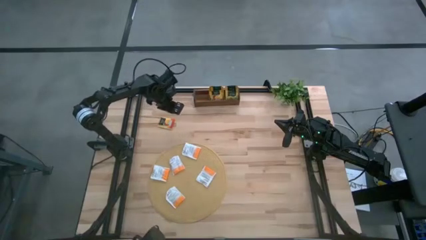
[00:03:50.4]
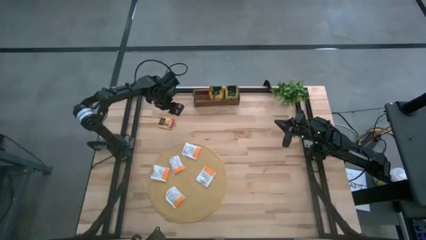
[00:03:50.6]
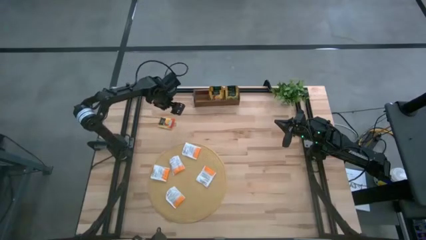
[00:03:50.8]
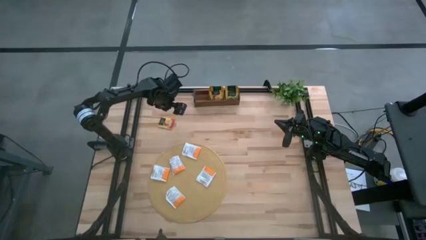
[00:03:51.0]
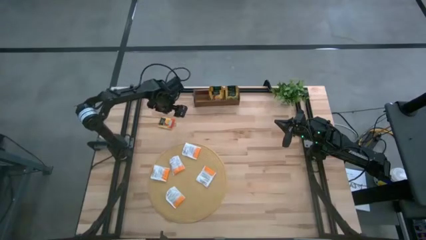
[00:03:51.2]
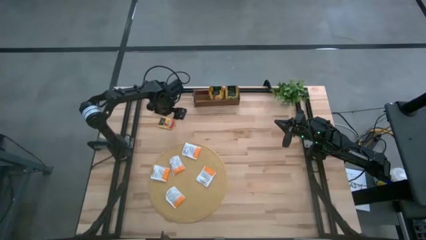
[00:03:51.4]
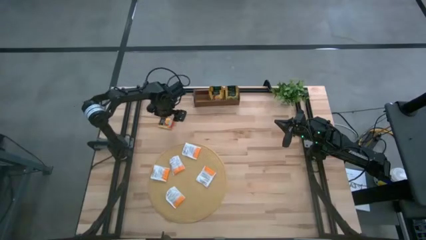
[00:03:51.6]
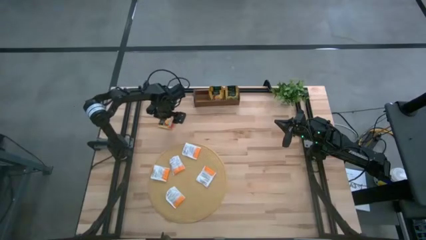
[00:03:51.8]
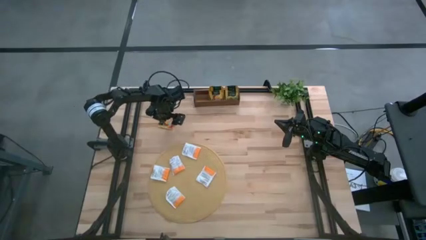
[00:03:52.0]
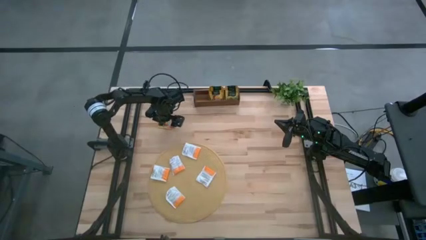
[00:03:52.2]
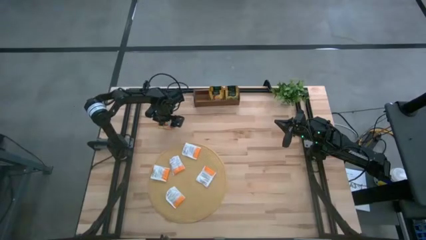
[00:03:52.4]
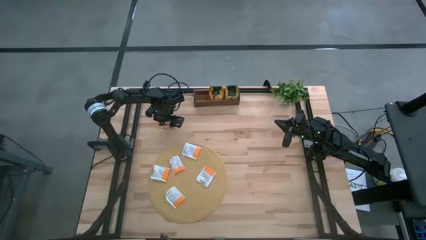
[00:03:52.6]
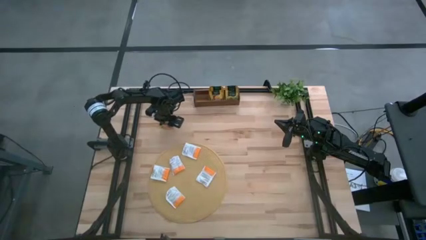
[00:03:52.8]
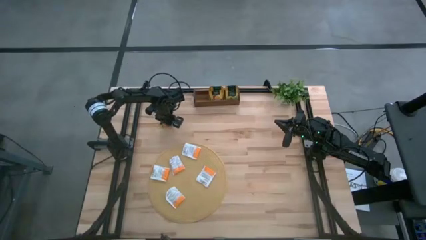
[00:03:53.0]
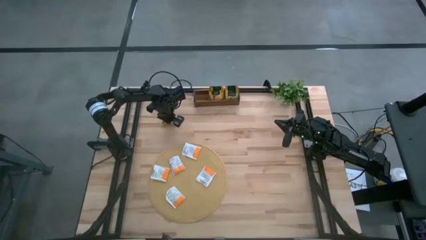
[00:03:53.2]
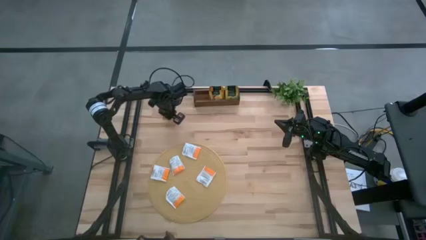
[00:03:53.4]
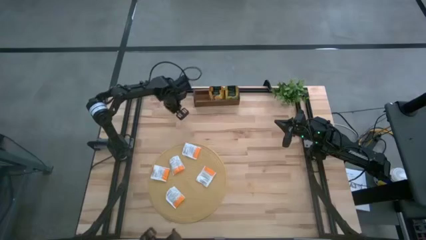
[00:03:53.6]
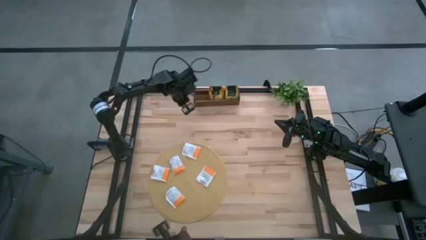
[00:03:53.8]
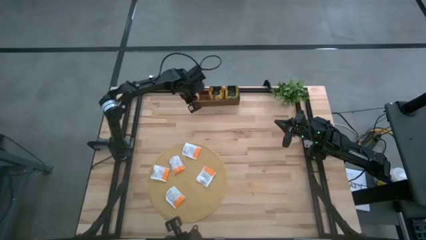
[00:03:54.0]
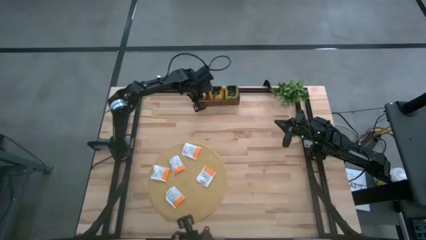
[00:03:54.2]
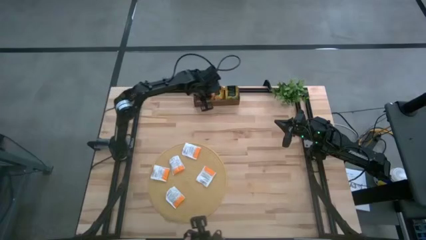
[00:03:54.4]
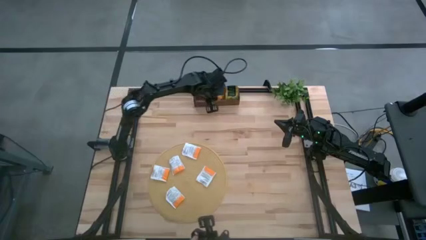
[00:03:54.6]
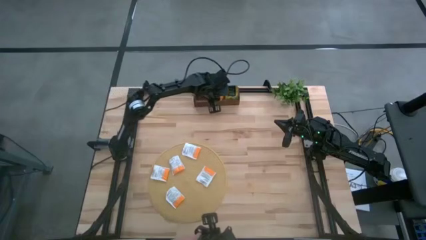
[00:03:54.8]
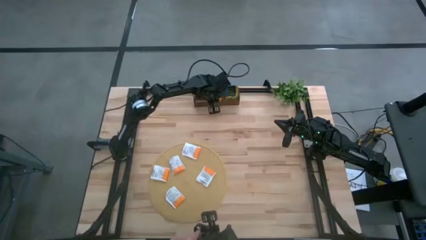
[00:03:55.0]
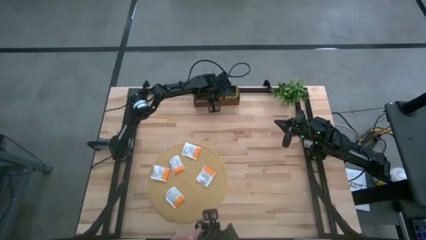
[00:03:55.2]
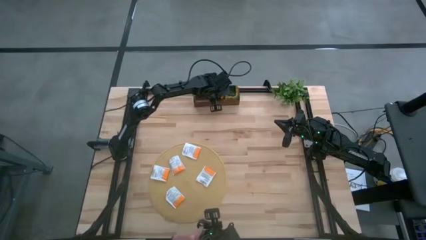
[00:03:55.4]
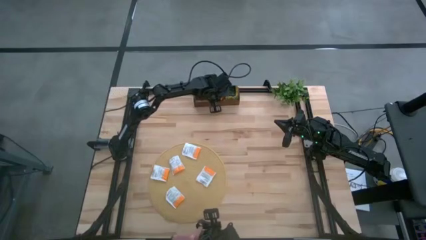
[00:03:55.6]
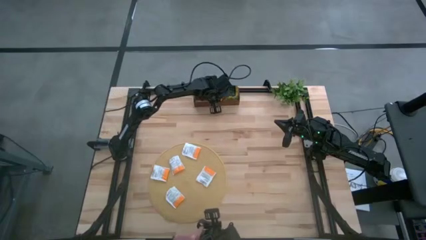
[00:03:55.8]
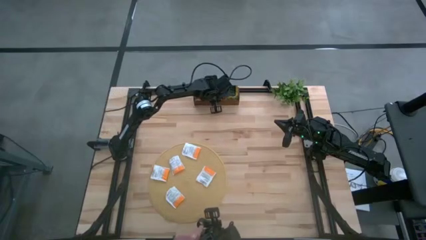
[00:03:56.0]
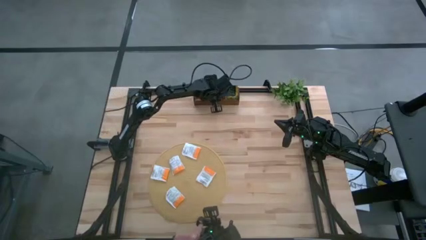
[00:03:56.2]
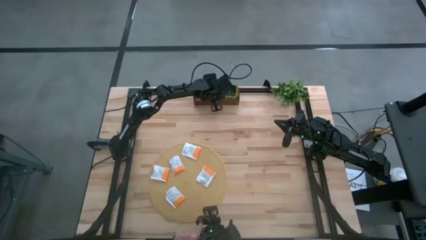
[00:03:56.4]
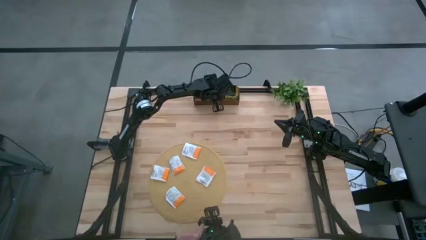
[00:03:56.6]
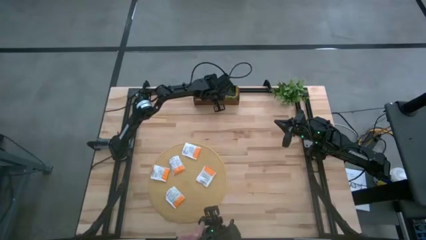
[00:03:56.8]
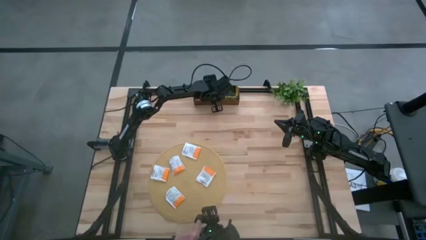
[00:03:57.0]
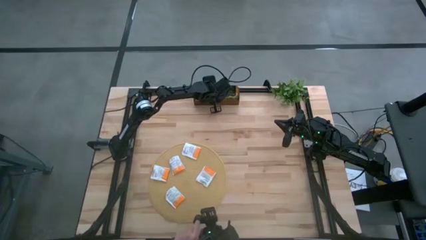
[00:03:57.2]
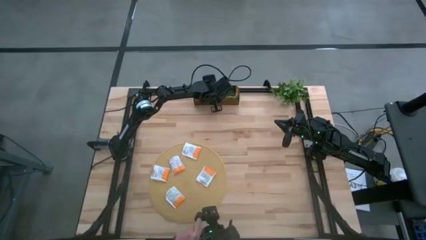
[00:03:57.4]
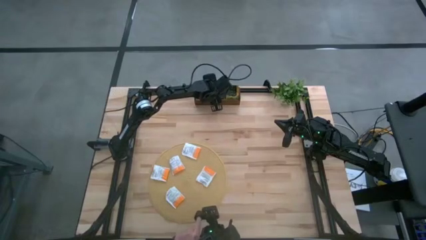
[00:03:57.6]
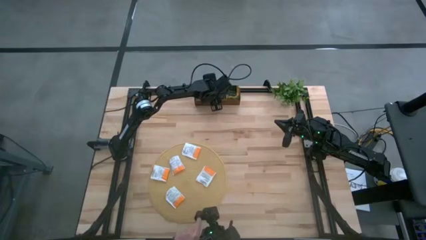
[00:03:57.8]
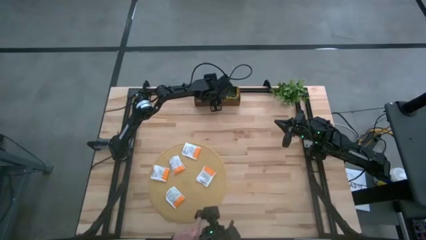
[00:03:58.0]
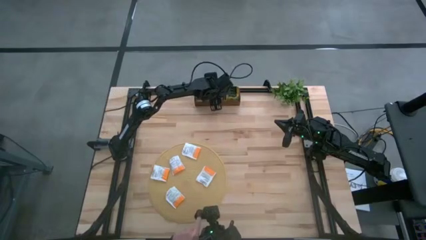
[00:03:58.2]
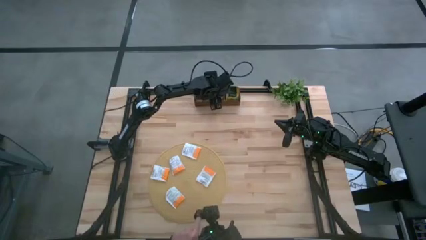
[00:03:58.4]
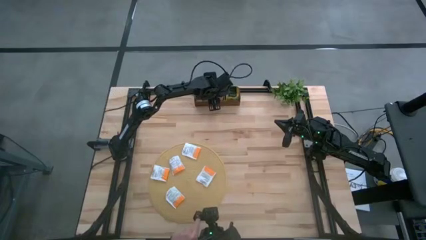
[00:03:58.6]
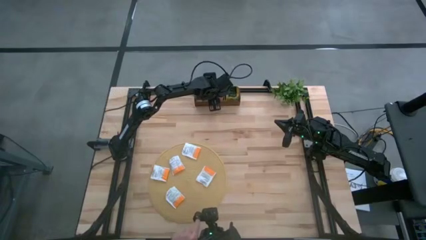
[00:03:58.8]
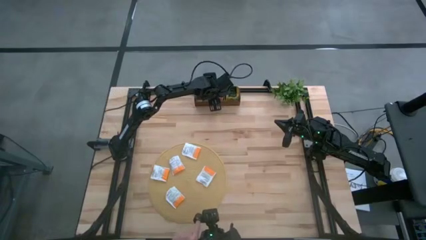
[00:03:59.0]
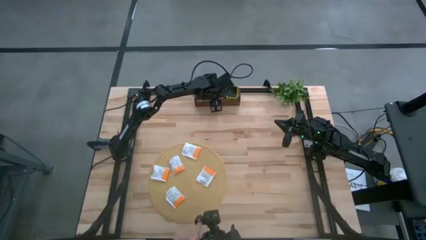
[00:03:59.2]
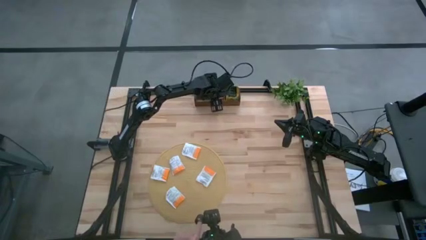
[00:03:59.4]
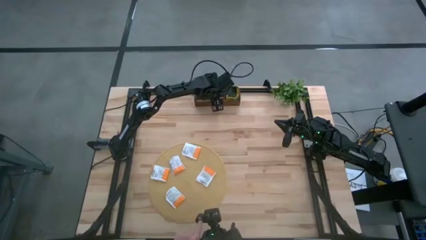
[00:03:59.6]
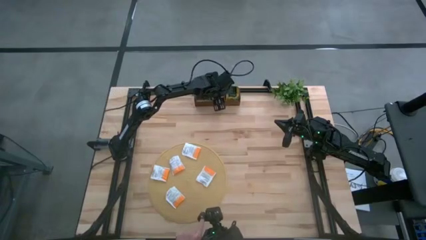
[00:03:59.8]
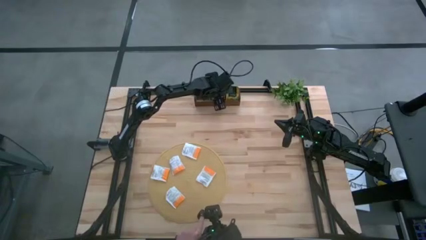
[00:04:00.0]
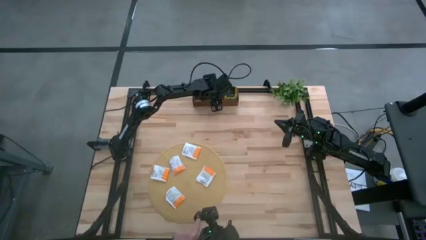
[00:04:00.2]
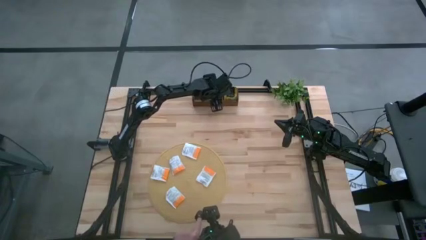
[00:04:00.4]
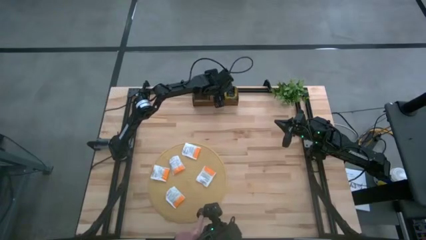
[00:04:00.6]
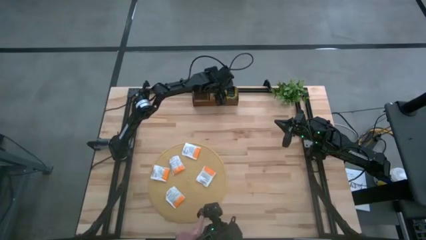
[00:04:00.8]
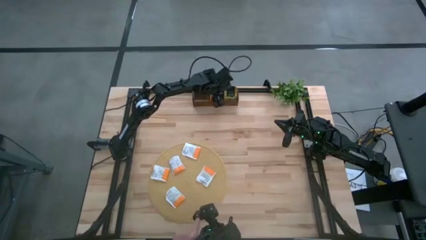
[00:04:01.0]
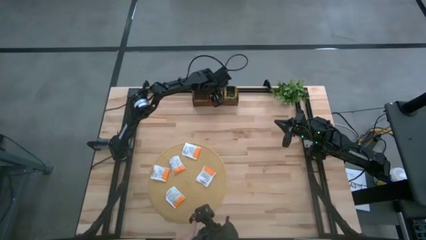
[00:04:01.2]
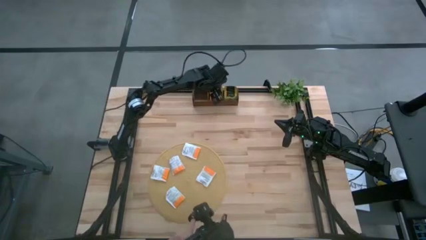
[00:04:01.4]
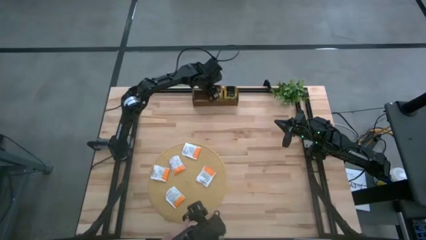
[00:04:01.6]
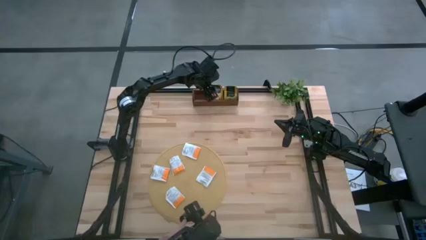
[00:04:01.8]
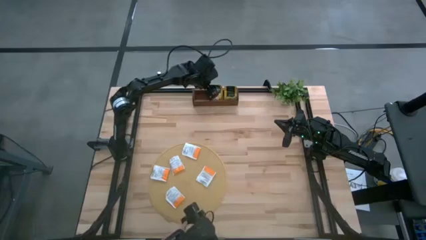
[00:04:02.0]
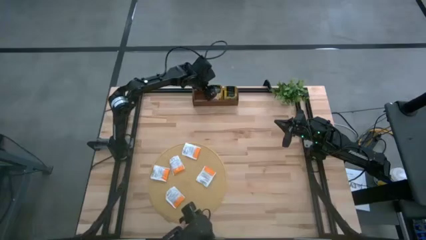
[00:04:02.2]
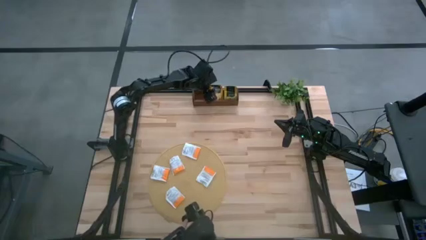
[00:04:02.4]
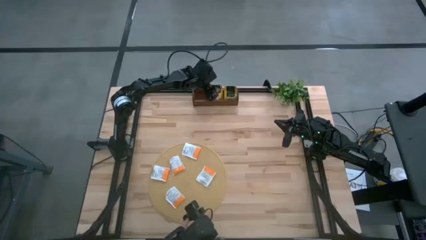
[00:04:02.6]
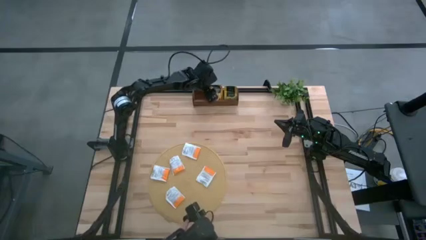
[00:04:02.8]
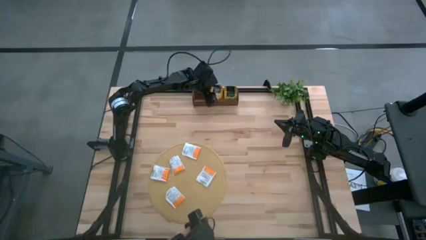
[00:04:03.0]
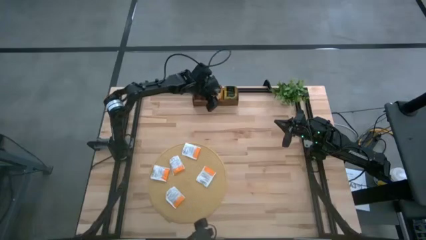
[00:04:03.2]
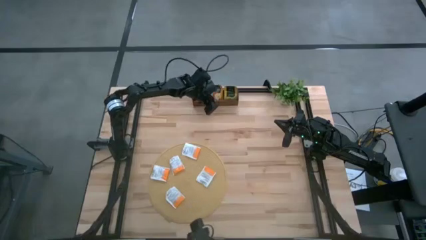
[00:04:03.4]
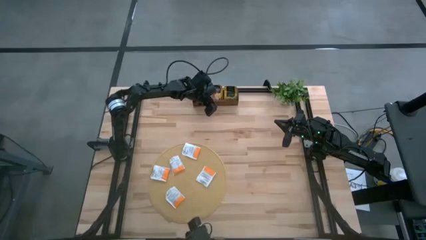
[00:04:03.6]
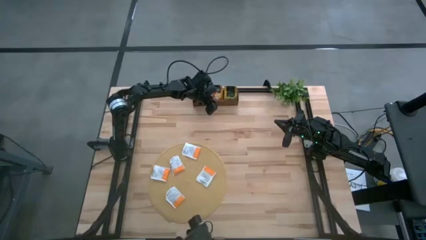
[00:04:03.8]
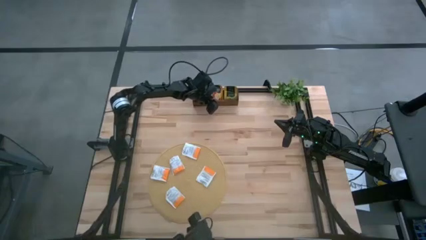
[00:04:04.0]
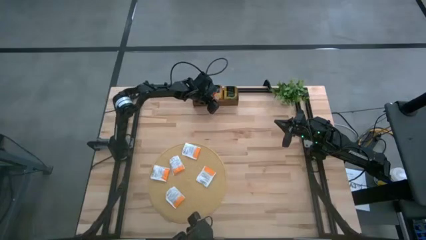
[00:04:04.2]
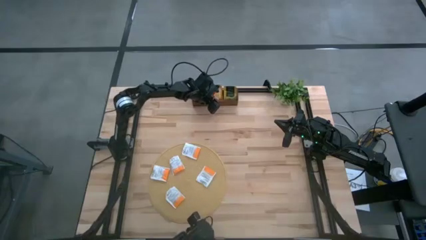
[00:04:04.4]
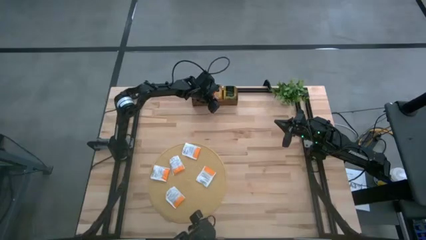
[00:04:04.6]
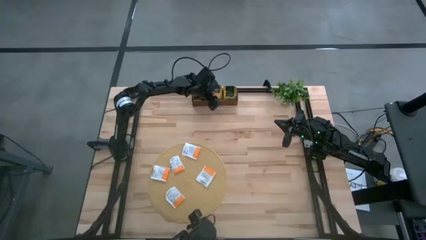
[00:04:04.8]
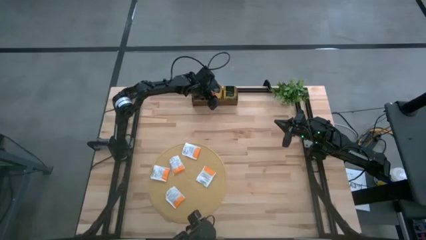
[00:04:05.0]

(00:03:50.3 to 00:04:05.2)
Task: Pick & Place Tea
Put the yellow tea bag into the middle slot of the wooden organizer

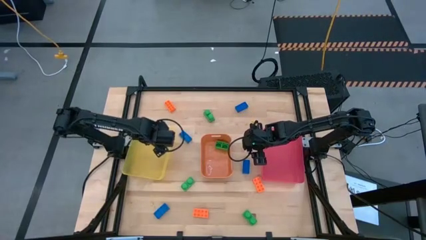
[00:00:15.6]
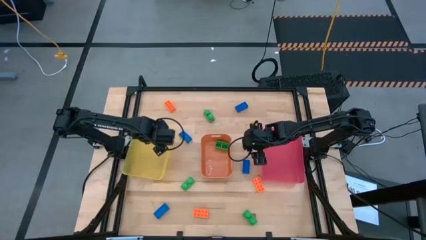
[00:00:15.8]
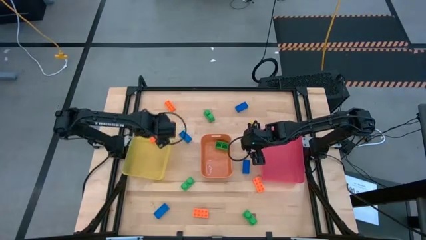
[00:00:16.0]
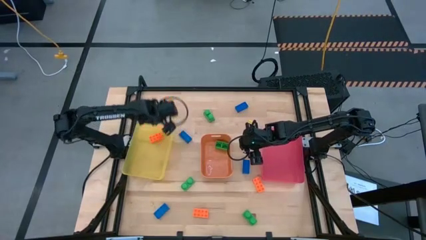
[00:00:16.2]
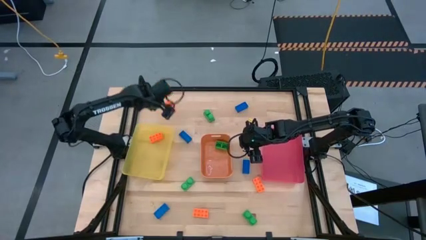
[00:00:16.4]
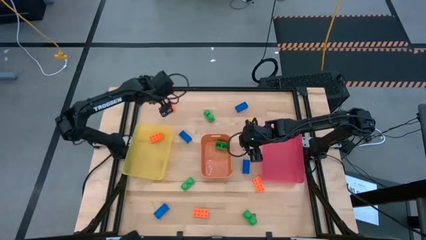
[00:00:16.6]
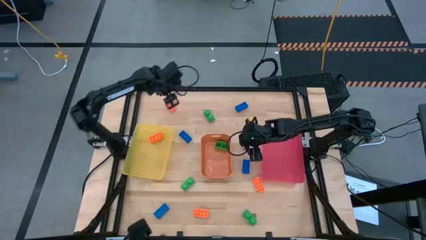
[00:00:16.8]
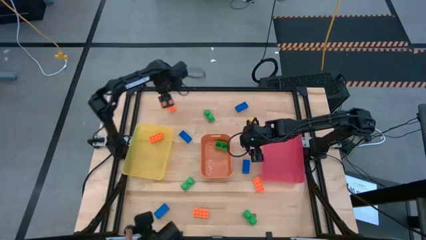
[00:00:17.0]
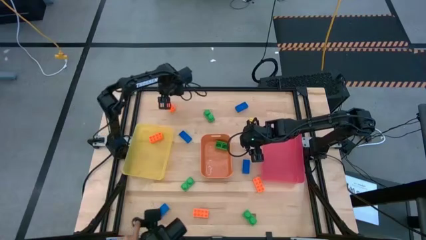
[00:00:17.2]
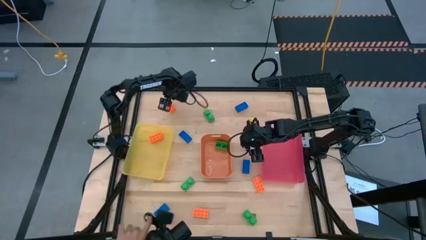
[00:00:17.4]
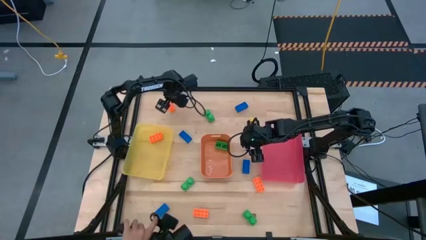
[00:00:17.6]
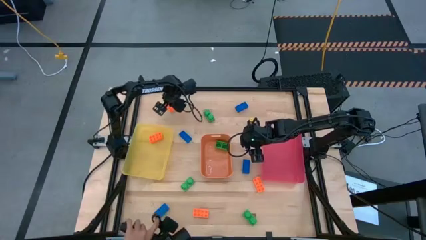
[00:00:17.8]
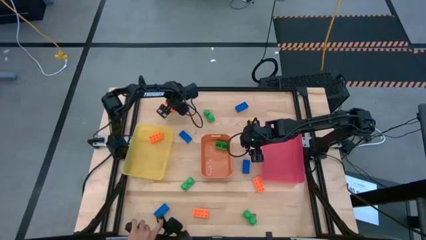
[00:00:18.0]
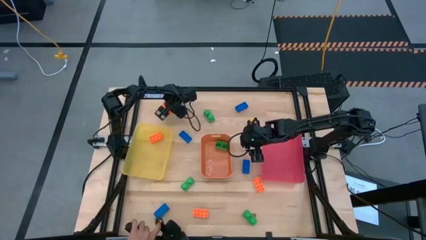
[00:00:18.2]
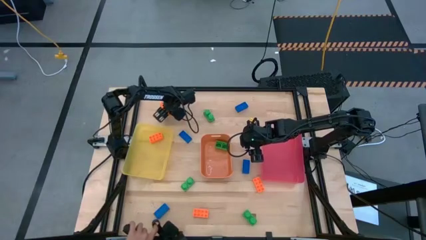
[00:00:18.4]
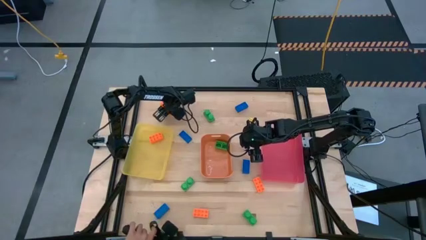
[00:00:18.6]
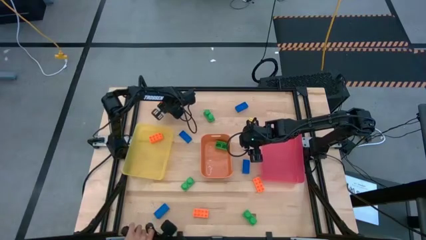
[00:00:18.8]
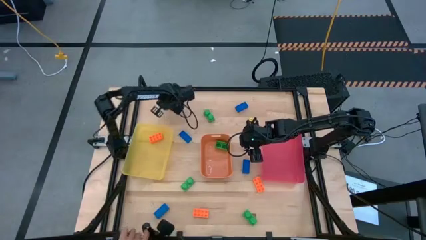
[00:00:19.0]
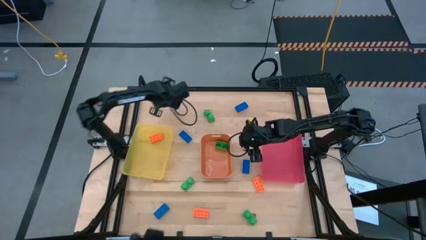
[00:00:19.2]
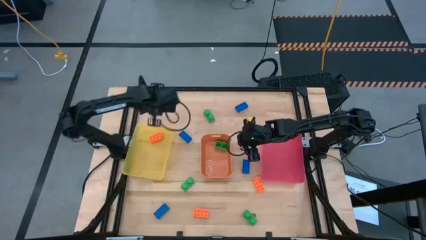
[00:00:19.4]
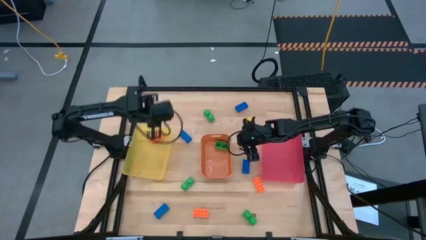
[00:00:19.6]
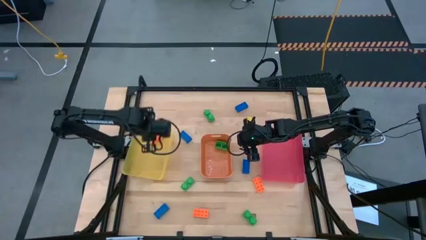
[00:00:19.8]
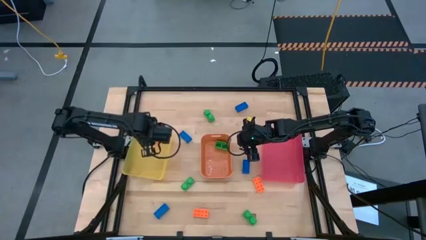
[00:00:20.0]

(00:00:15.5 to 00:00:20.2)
Task: Sort & place blocks by color
Put the orange game piece into the yellow bin
